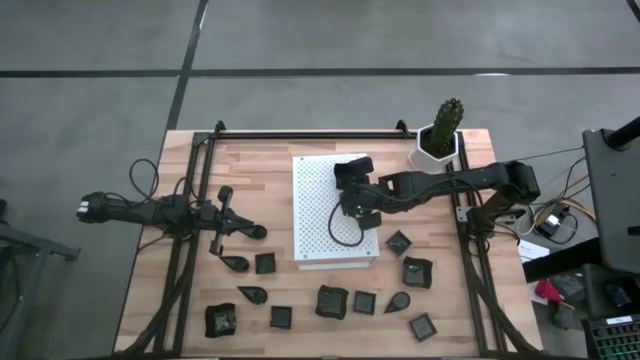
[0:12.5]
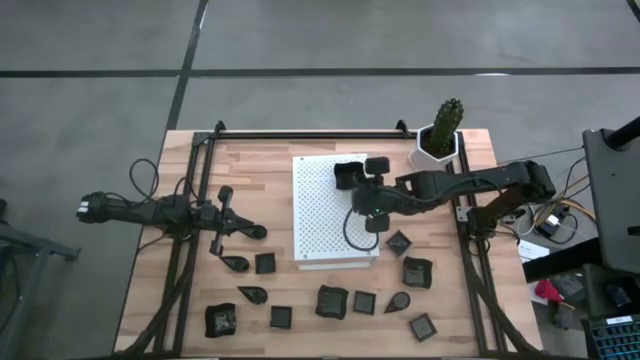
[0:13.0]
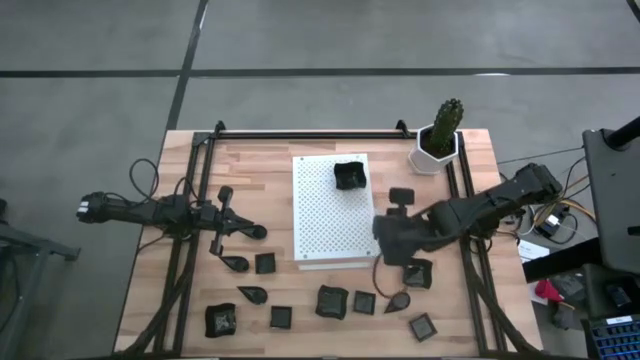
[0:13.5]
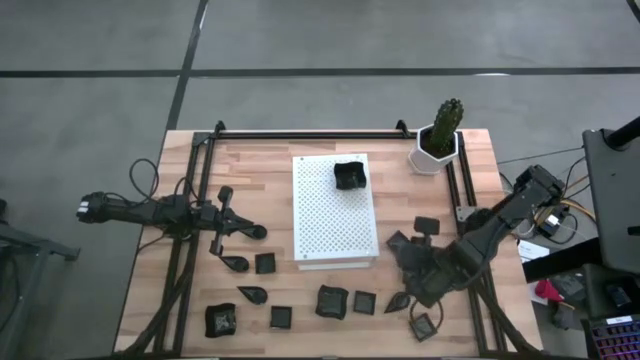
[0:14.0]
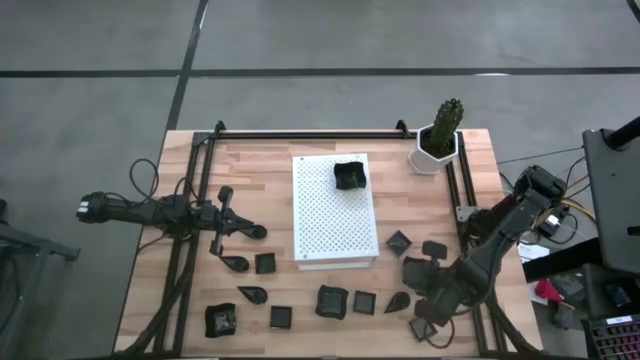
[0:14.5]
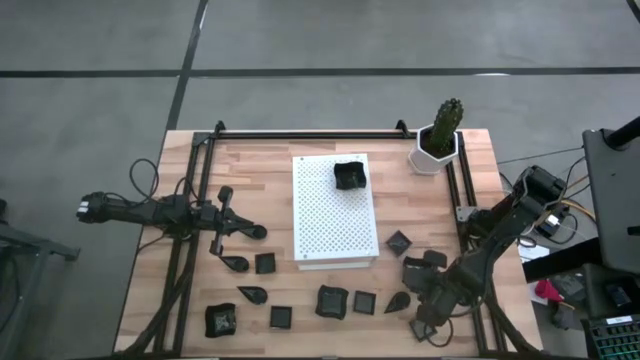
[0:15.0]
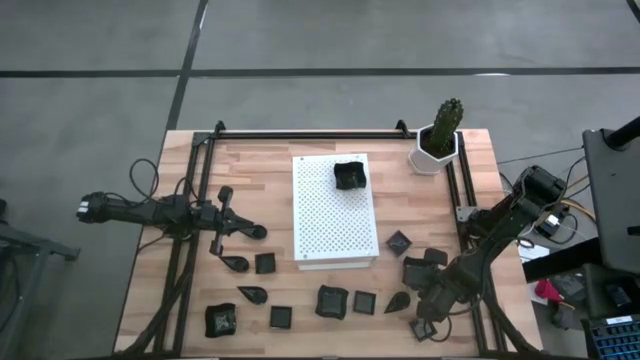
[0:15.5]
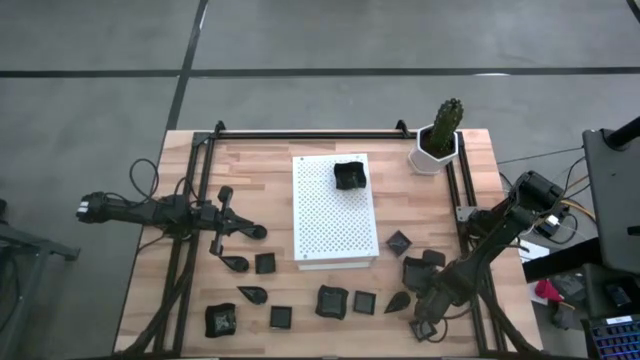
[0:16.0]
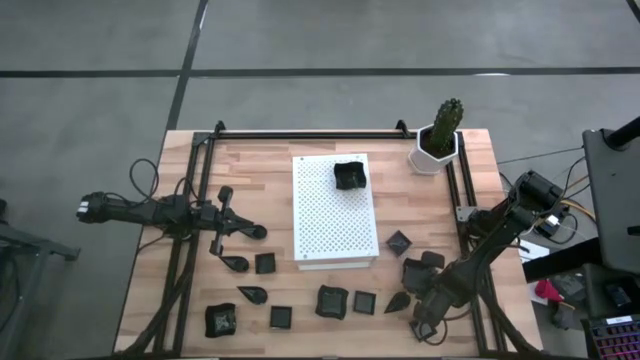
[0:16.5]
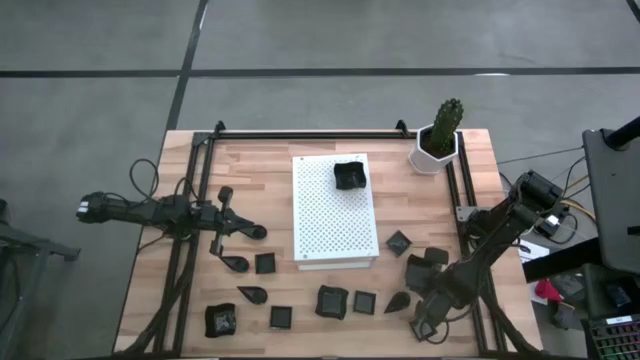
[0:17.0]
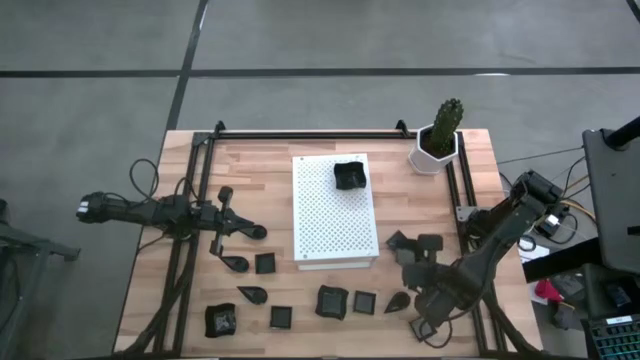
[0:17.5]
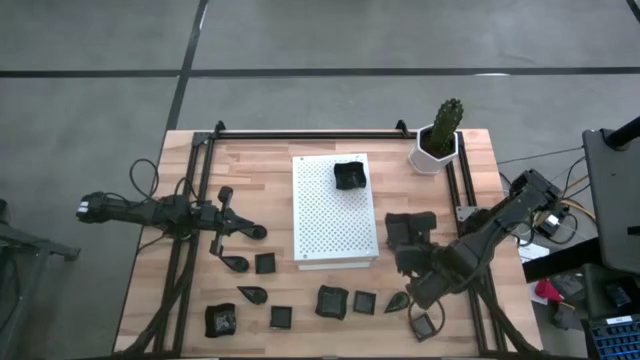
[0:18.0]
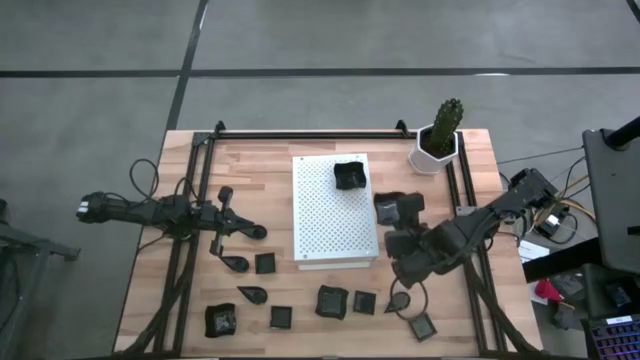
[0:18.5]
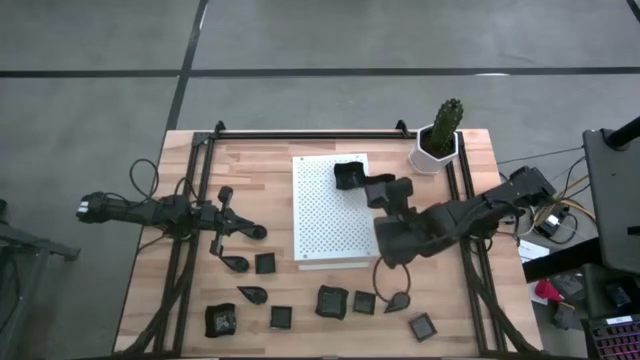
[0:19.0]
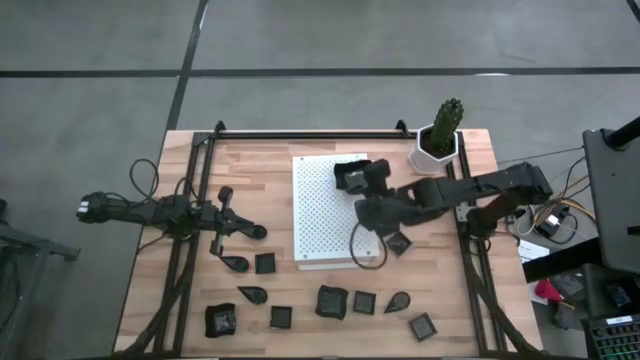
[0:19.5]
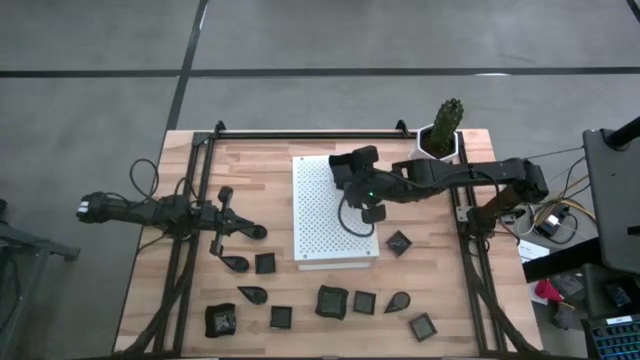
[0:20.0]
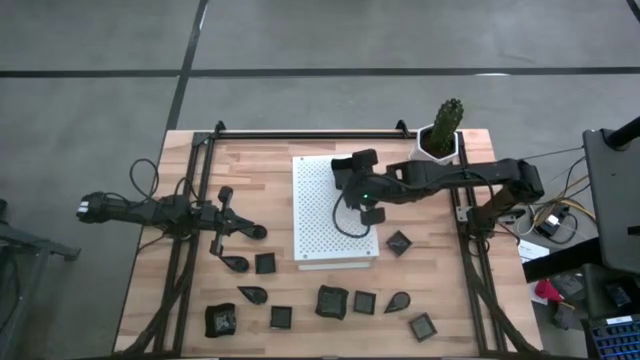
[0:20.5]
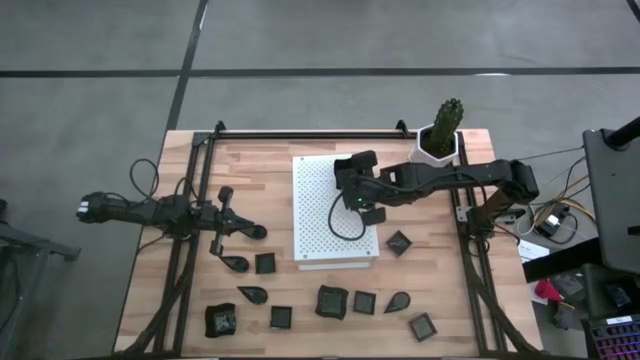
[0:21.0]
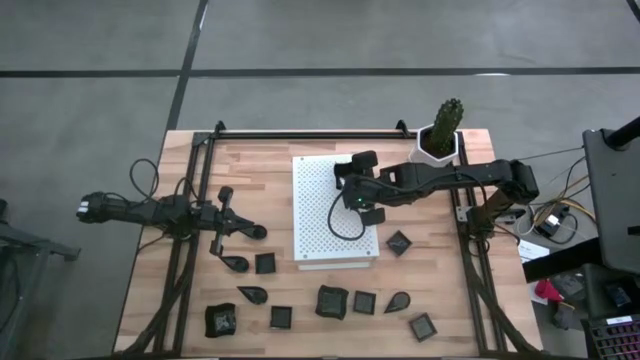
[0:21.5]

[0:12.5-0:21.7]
Task: Pick & Place Mini shaped plates
Stack the black distorted square plate on top of the black distorted square plate on the shelf

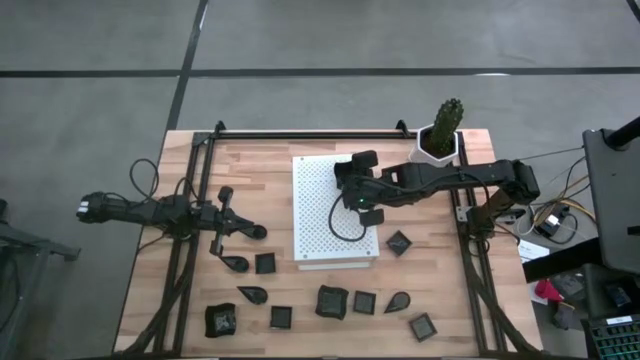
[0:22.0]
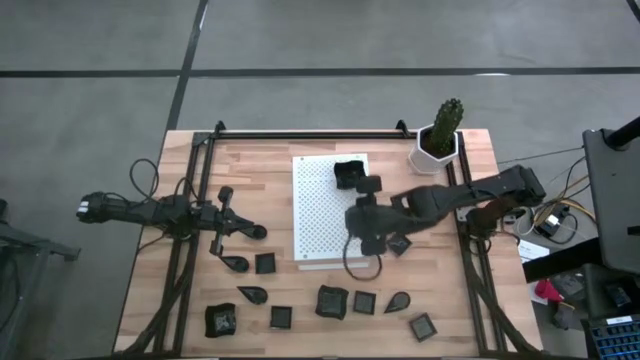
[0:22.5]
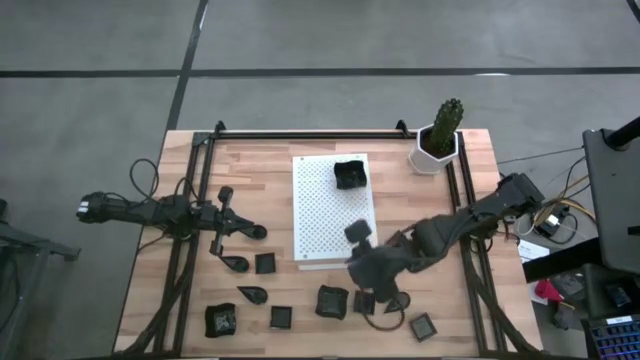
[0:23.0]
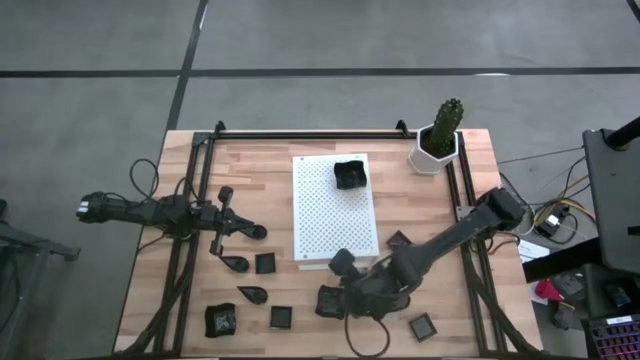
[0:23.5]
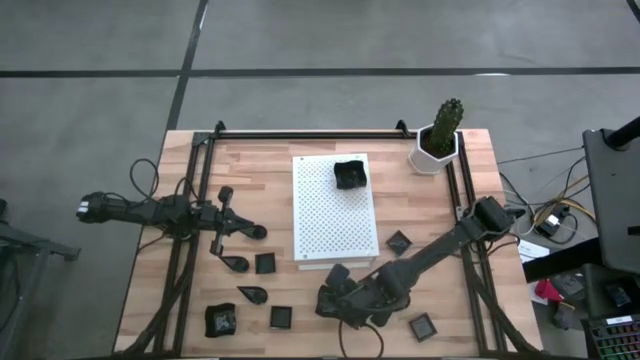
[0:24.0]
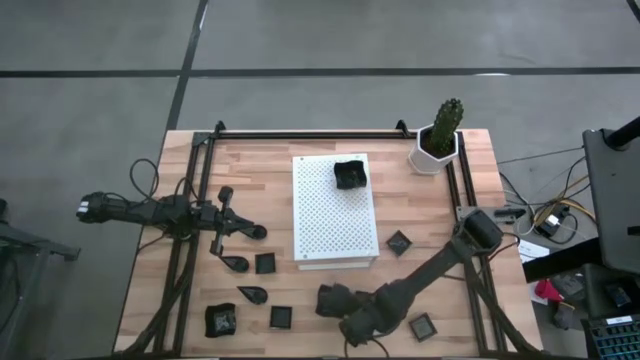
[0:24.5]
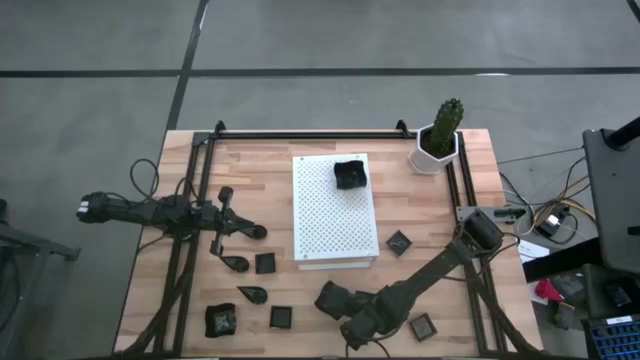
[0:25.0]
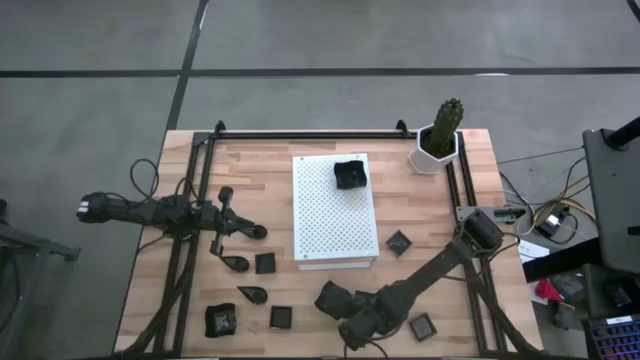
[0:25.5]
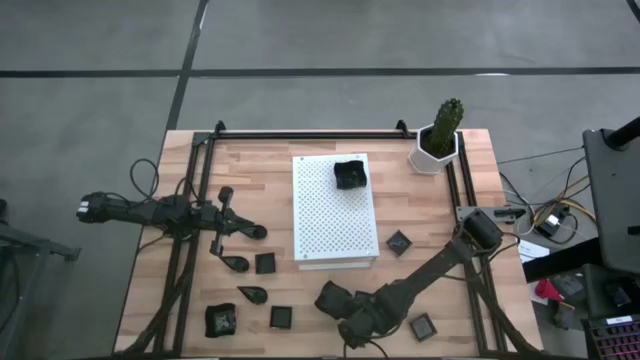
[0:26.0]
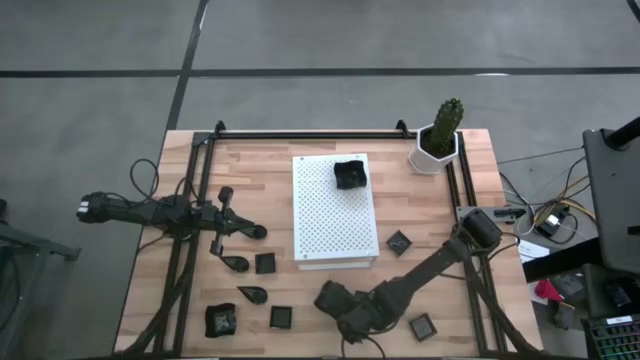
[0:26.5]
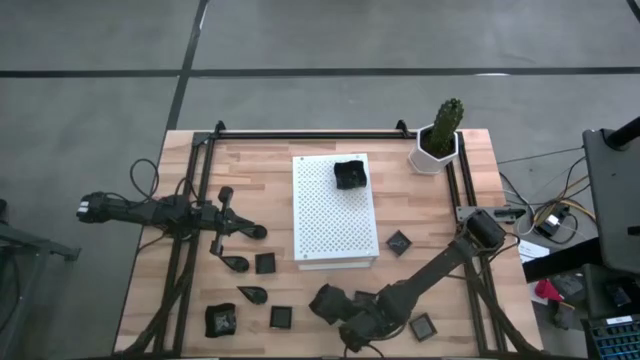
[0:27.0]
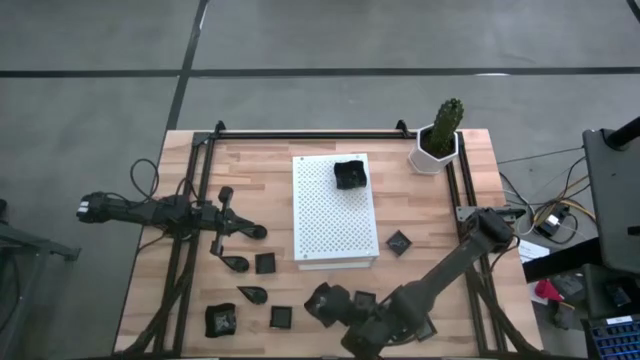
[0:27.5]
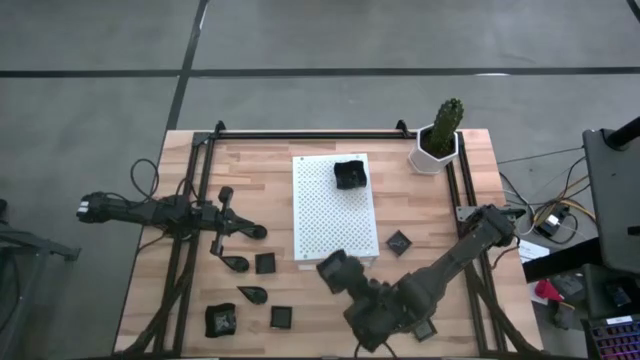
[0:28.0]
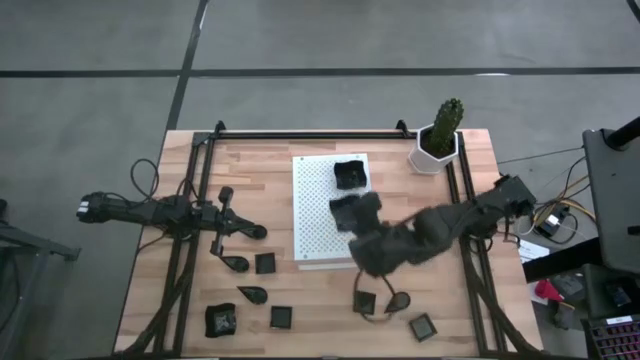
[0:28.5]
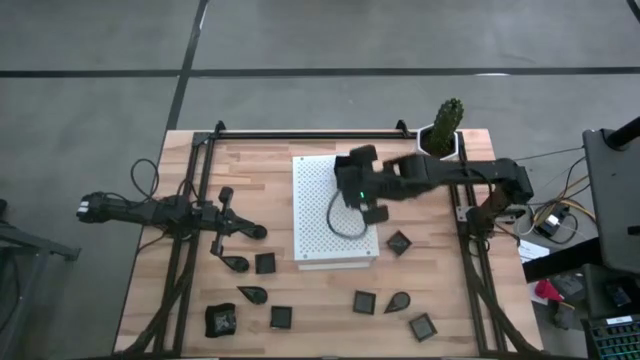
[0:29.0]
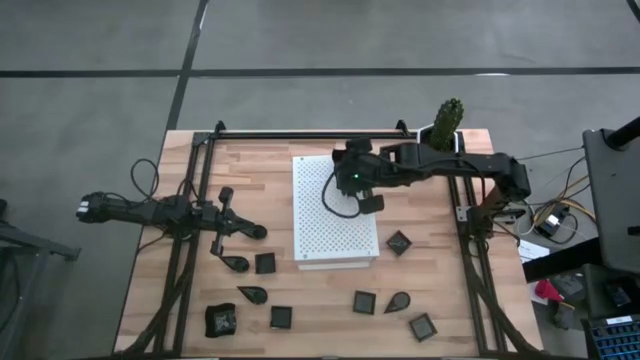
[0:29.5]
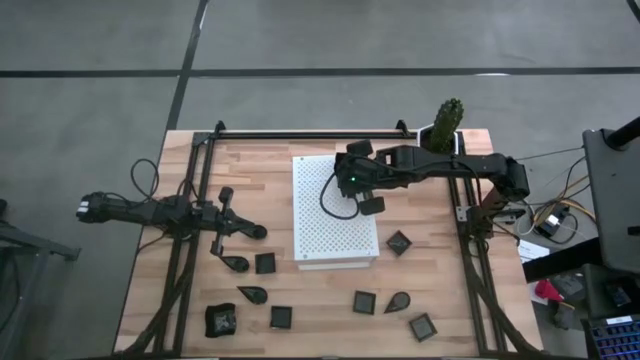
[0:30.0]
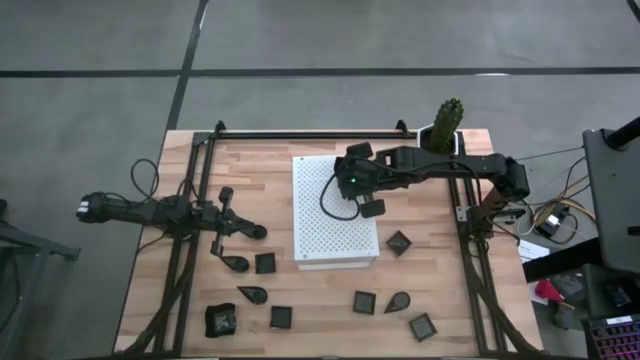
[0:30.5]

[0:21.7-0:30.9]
Stack the black distorted square plate on top of the black distorted square plate on the shelf

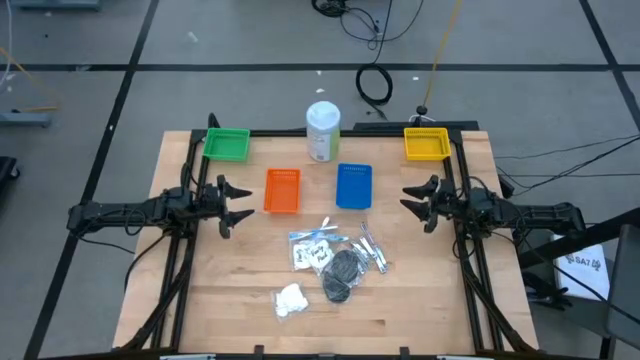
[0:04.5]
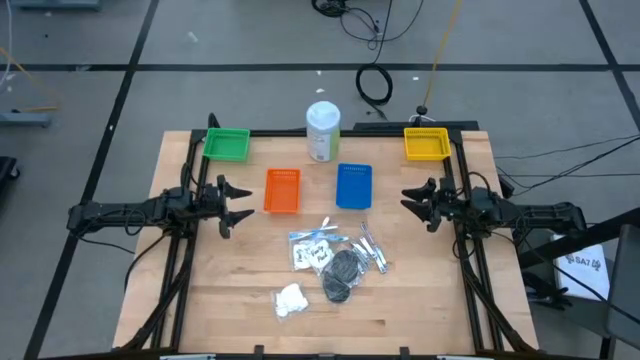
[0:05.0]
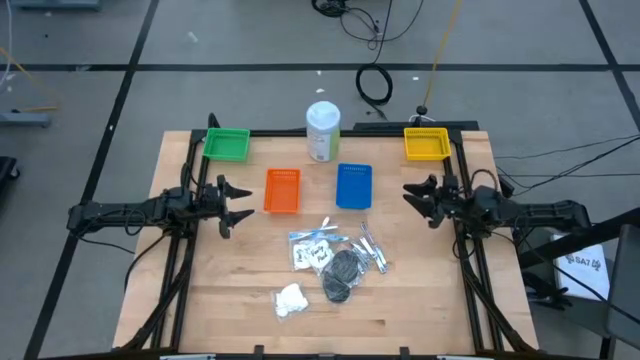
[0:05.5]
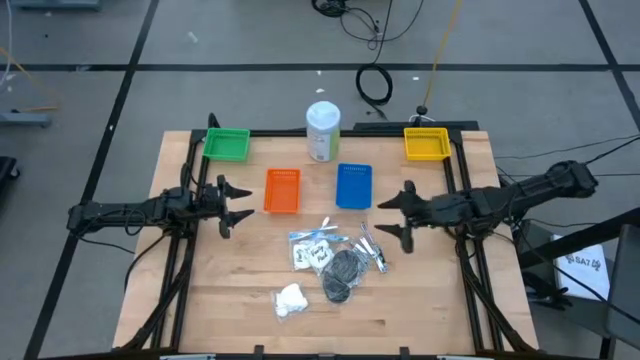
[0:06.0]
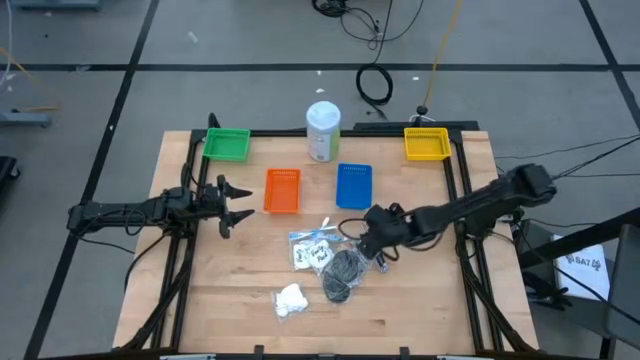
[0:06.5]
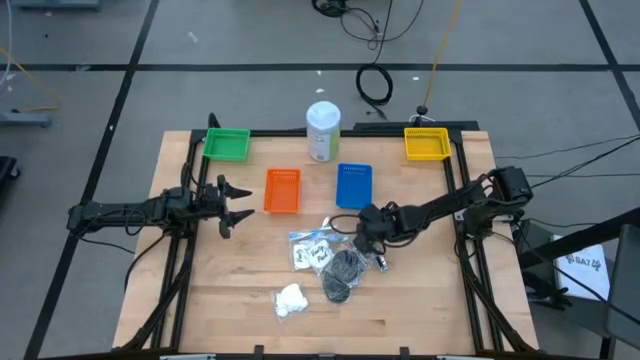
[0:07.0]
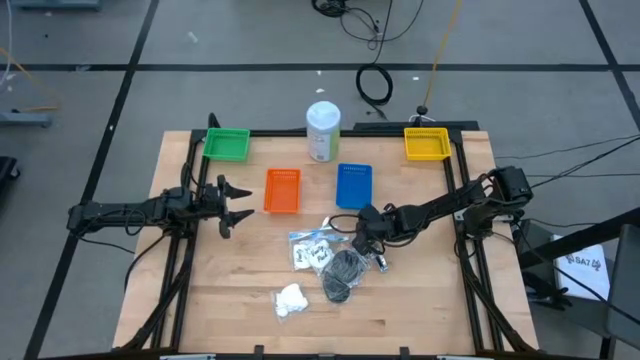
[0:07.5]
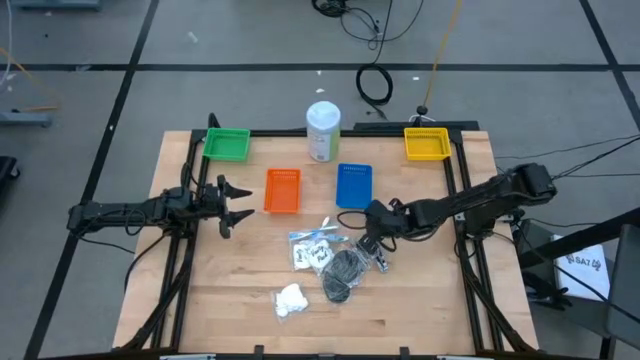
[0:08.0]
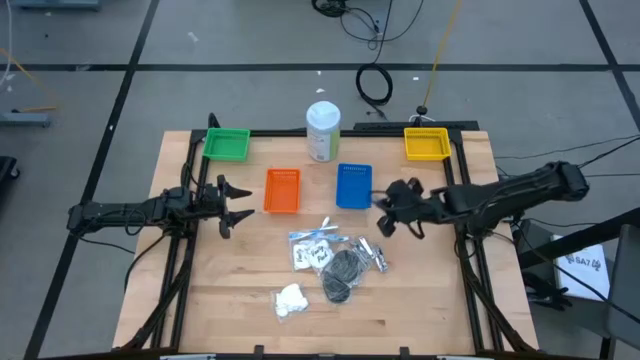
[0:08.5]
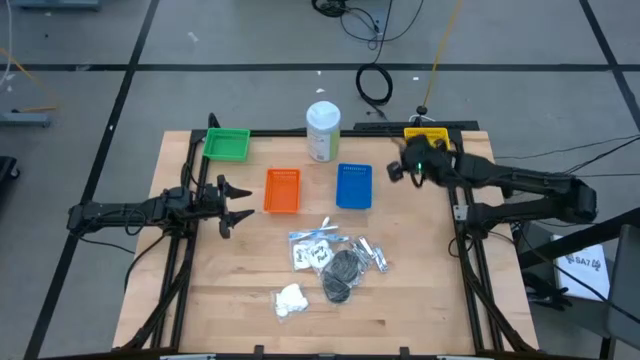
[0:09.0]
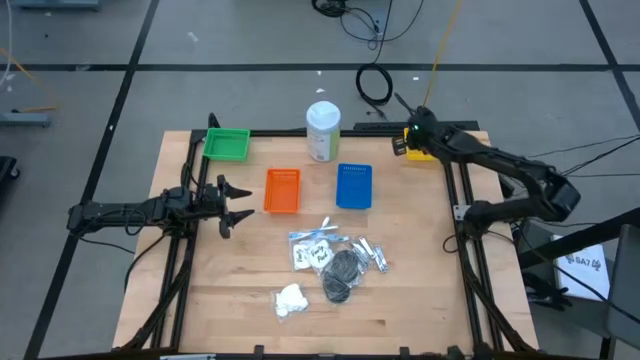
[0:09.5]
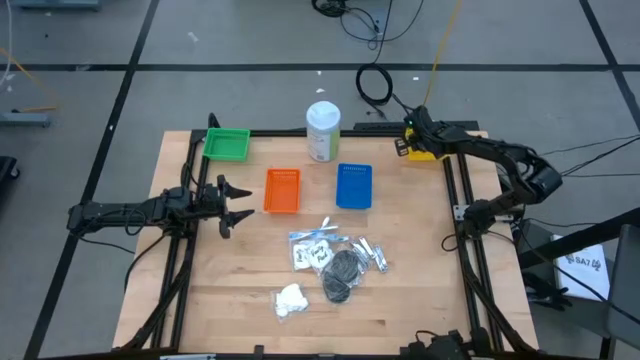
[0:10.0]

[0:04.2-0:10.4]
Task: Pick & Place Travel size toiletries
Put the nail cutter into the yellow bin
